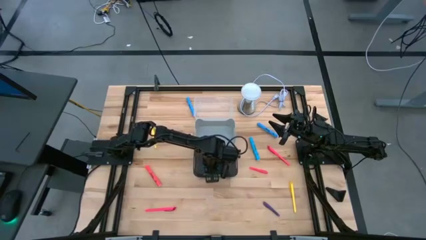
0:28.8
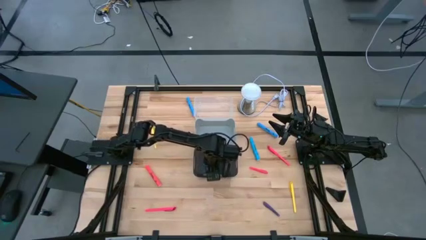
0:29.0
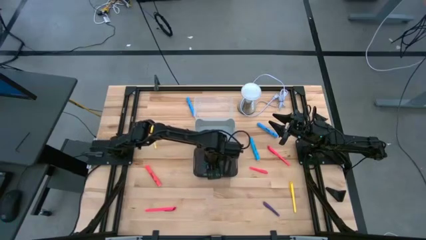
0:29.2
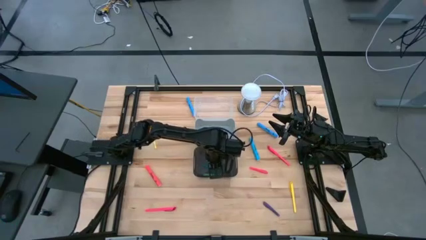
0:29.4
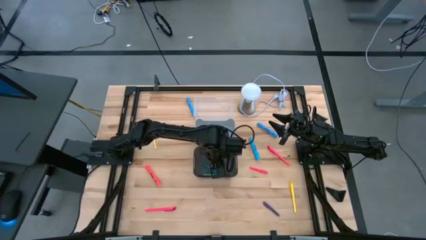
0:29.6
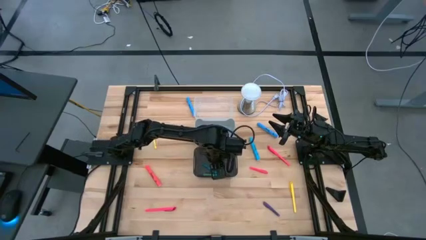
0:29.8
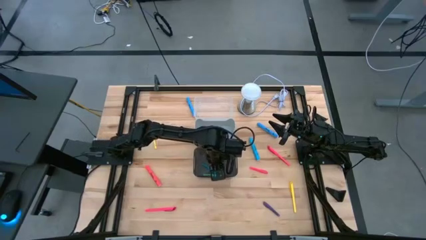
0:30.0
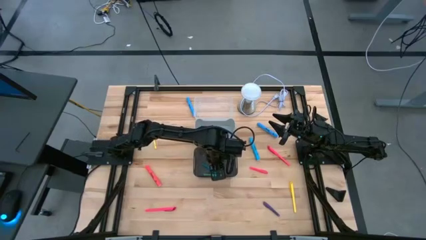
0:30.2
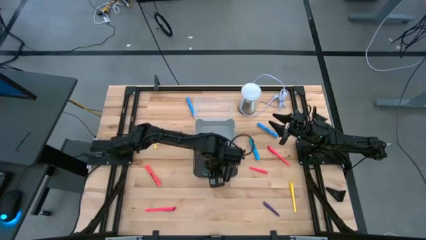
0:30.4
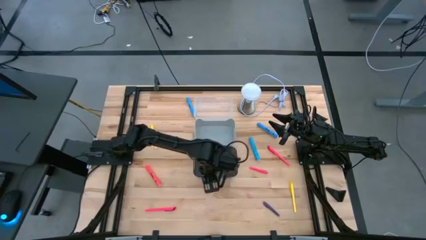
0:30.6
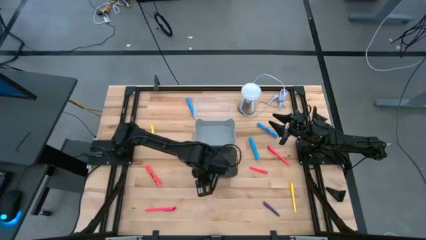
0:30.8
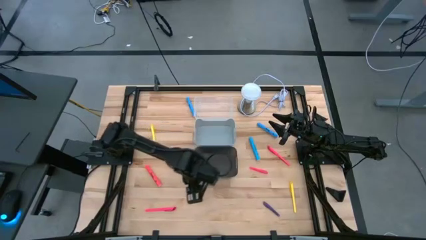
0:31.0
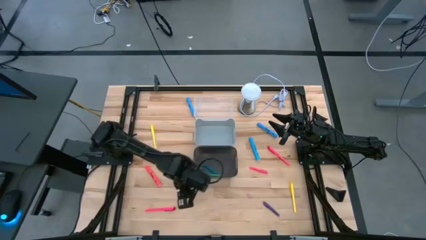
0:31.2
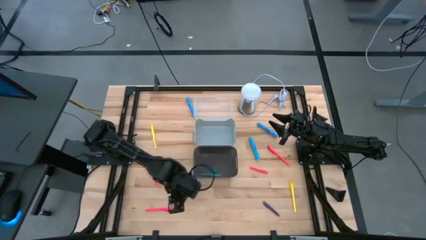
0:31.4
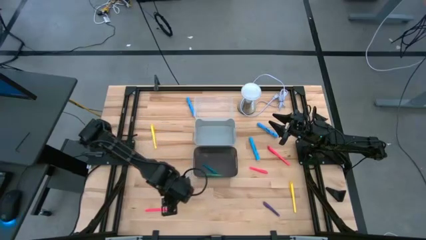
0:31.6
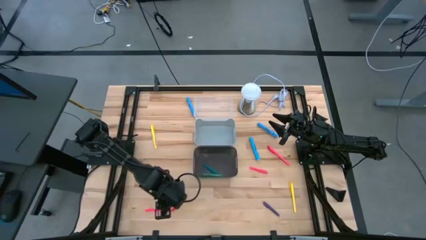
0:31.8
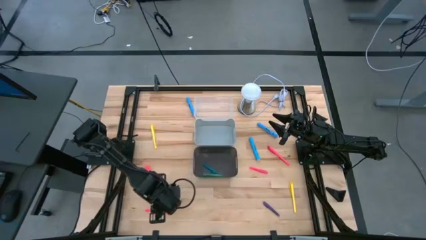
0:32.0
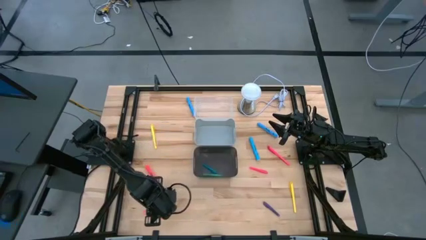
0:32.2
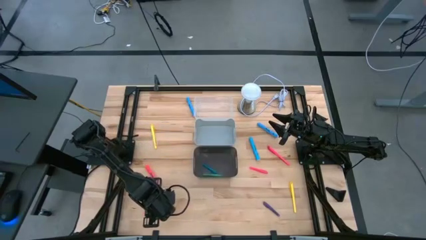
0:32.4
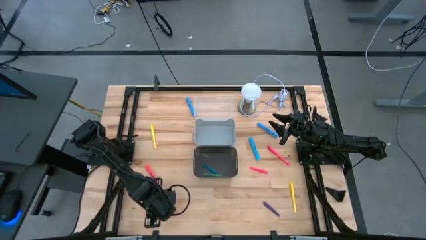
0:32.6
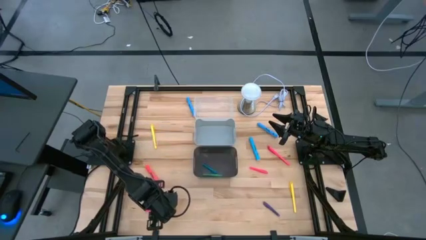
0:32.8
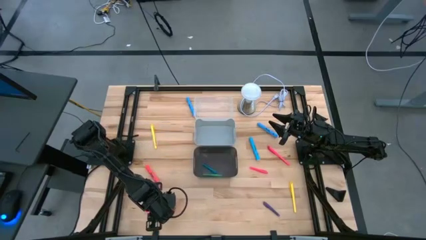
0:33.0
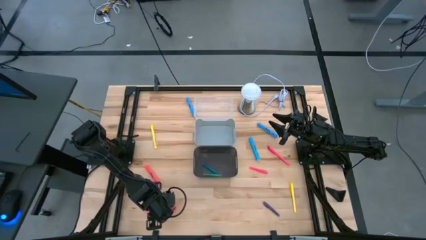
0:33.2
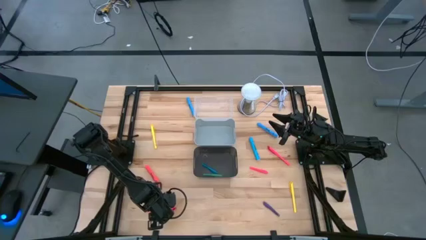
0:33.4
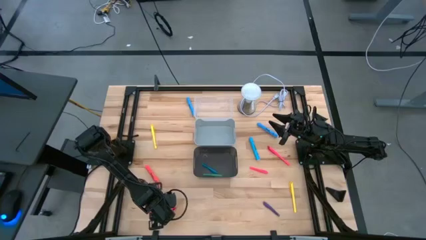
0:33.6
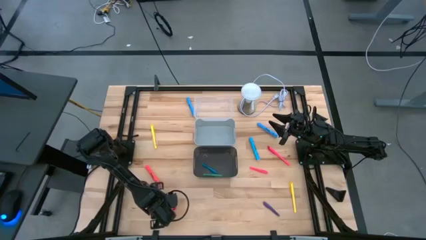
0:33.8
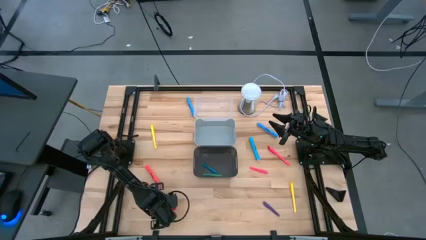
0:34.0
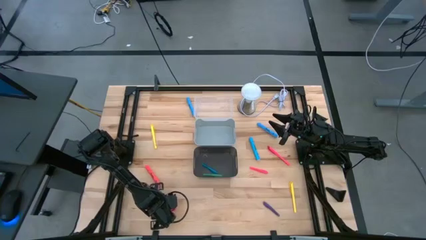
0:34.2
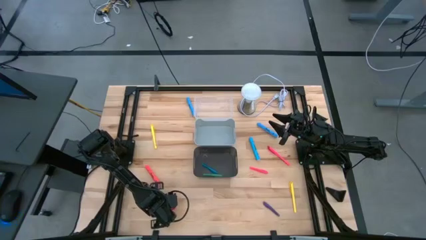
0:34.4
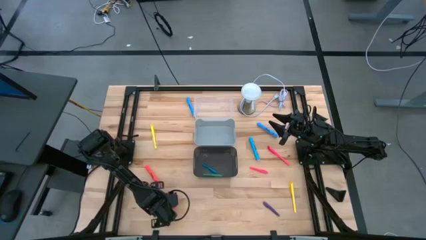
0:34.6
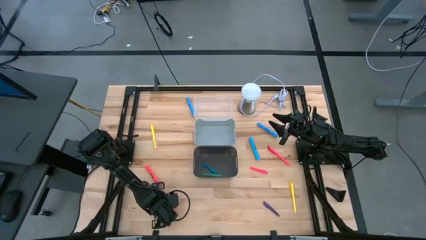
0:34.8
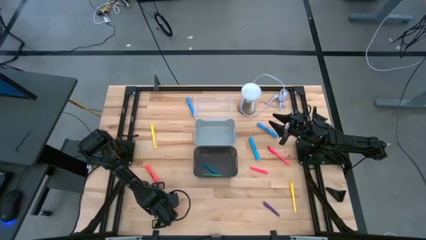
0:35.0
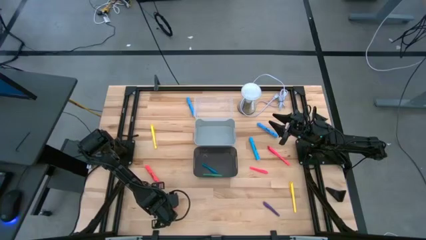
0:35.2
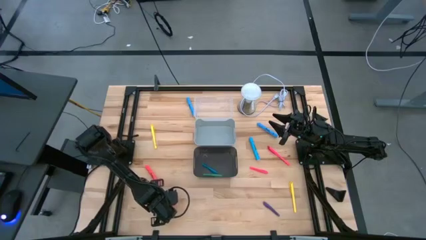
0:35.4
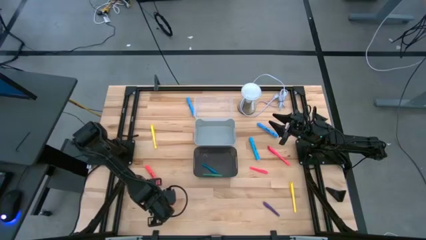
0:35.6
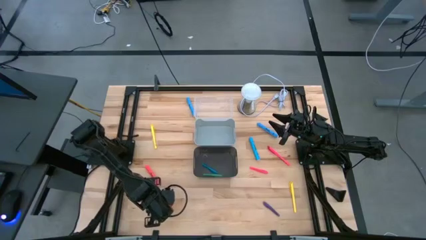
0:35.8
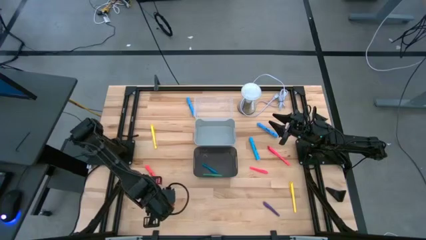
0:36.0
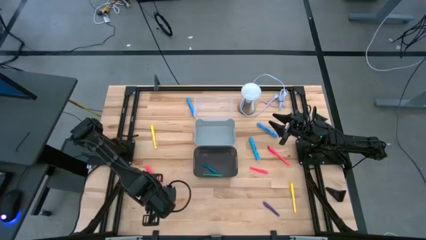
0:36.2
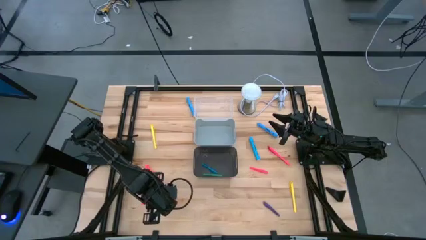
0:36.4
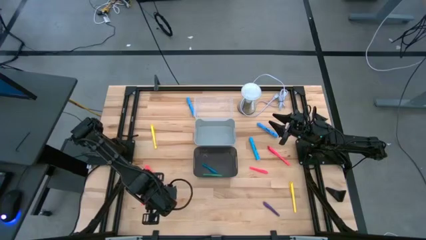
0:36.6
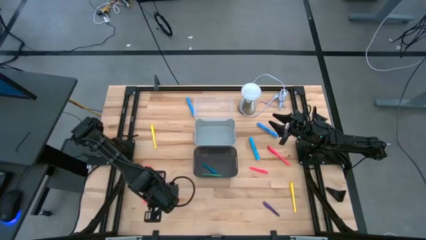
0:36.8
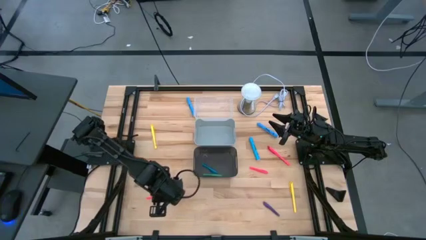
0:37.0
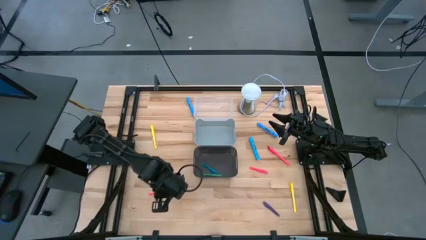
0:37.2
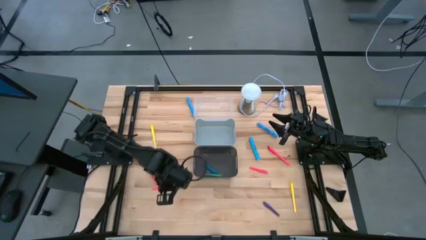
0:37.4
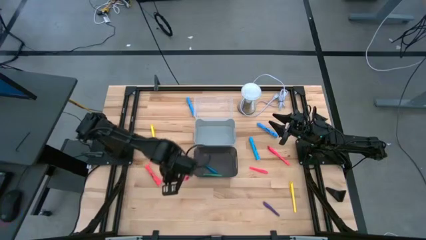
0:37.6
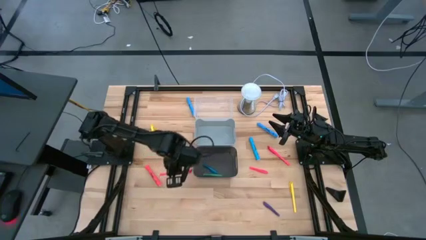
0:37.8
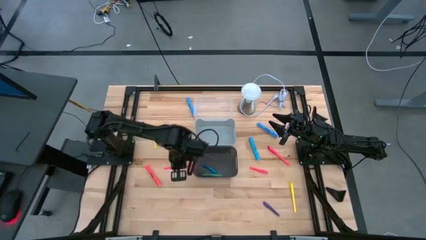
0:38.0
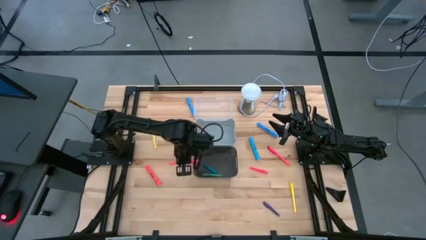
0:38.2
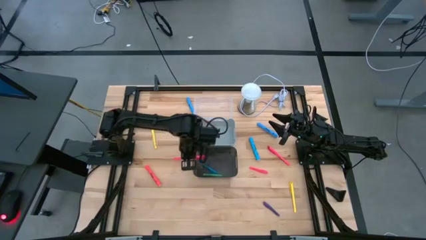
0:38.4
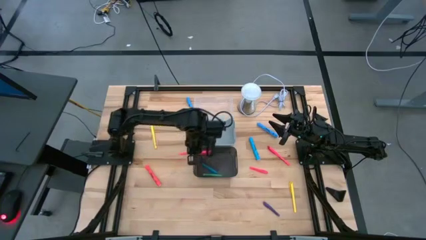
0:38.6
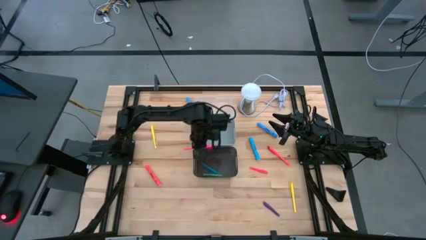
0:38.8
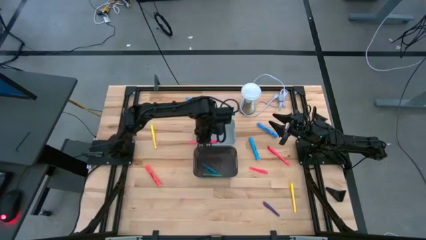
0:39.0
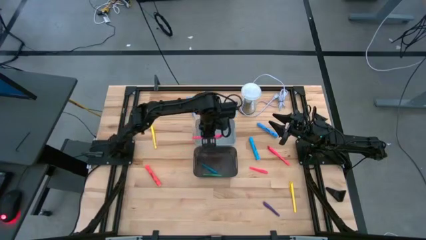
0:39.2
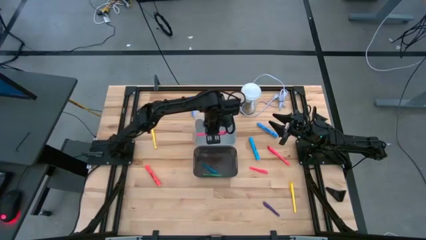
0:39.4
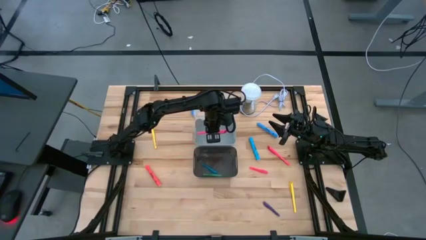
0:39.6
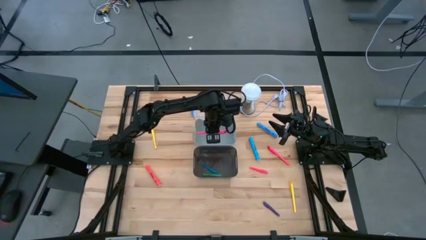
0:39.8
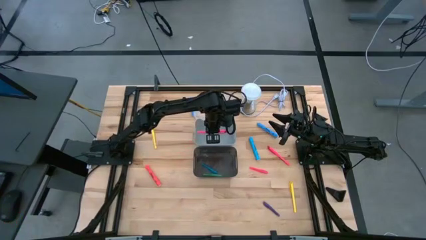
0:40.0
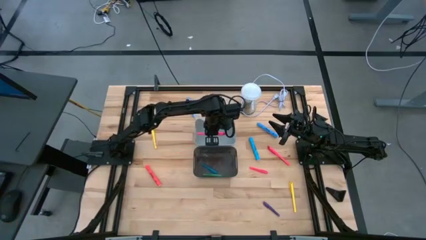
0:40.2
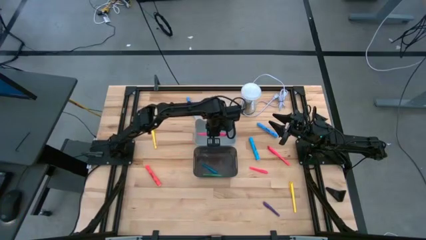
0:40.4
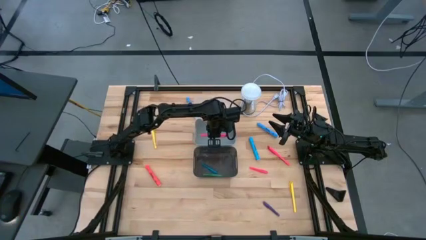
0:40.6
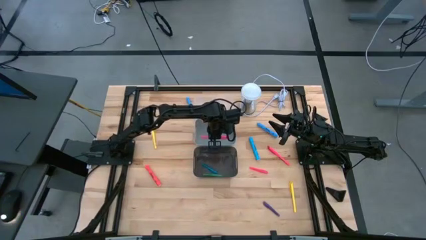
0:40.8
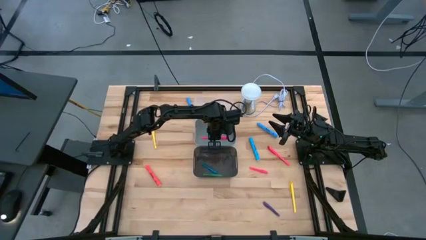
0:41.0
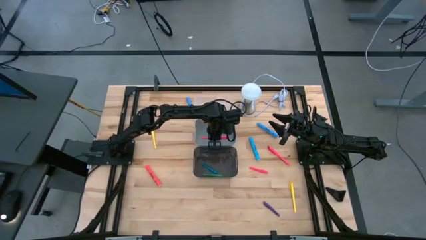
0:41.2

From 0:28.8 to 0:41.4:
Task: Pick & Place Markers
Put the pink marker into the transparent bin

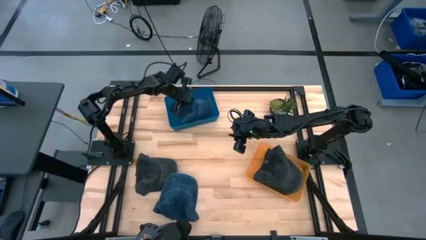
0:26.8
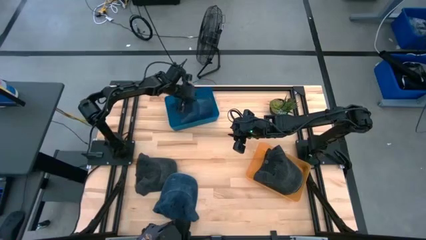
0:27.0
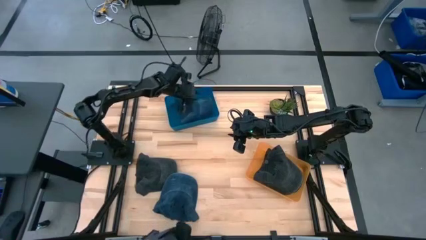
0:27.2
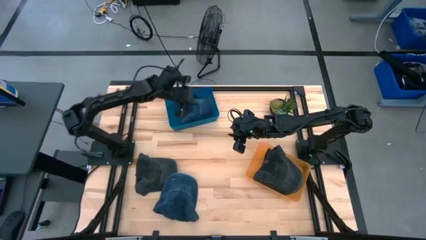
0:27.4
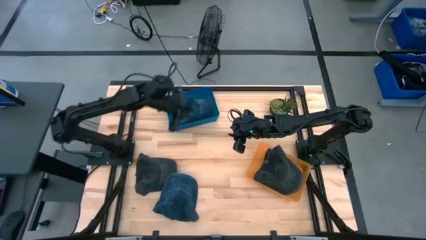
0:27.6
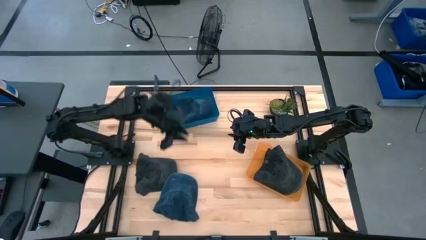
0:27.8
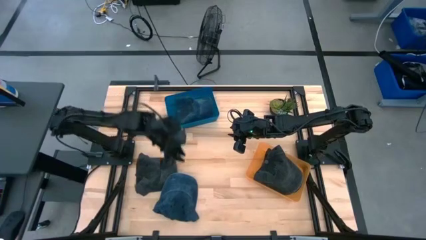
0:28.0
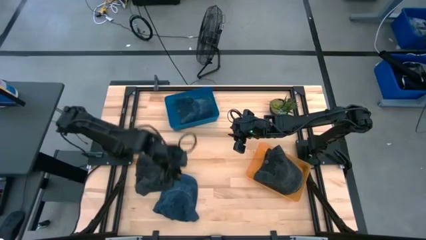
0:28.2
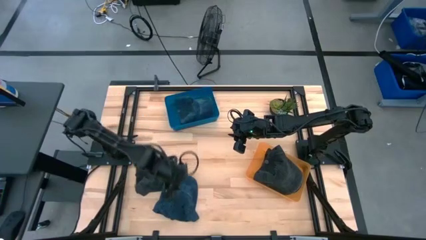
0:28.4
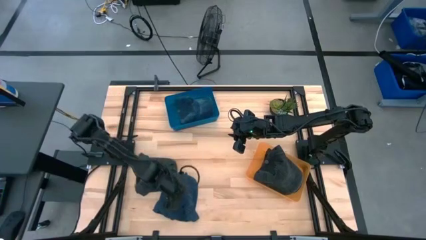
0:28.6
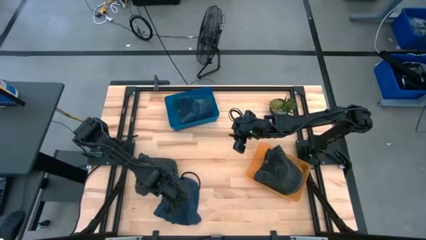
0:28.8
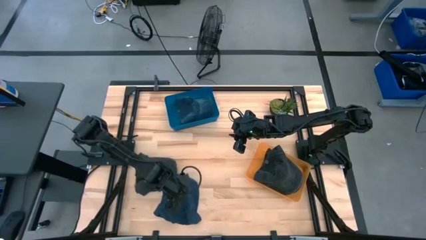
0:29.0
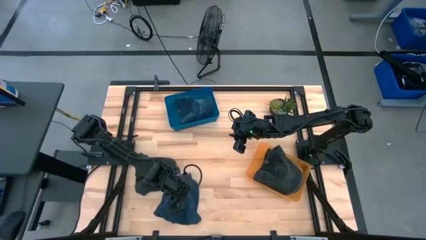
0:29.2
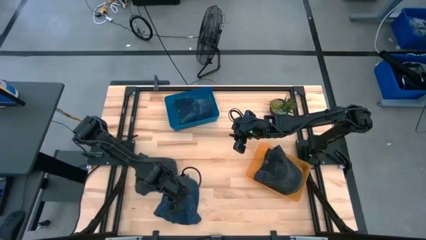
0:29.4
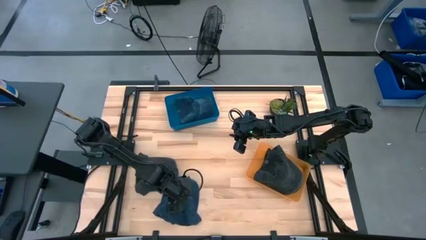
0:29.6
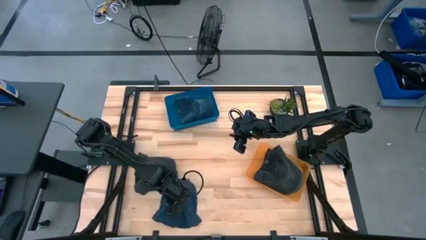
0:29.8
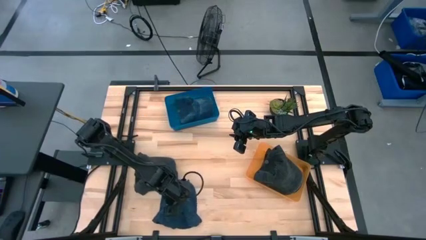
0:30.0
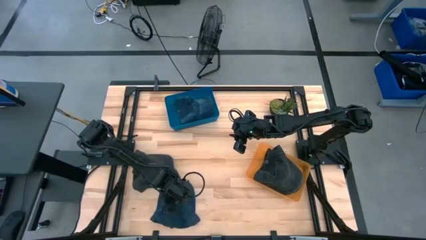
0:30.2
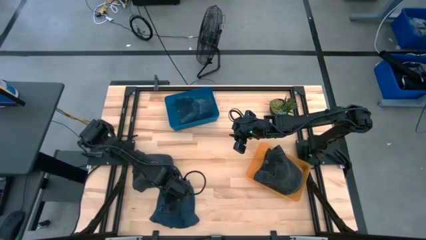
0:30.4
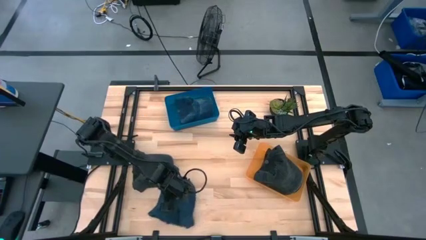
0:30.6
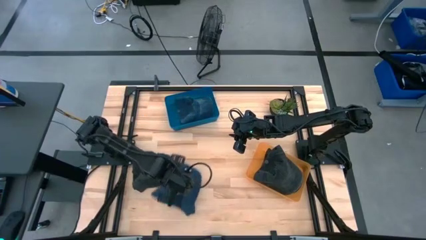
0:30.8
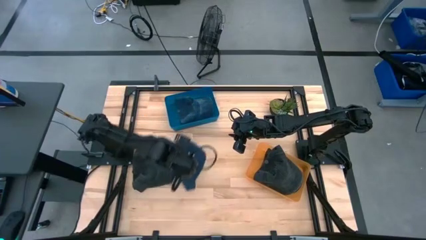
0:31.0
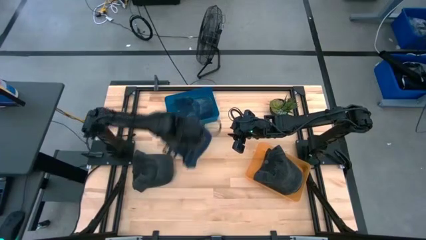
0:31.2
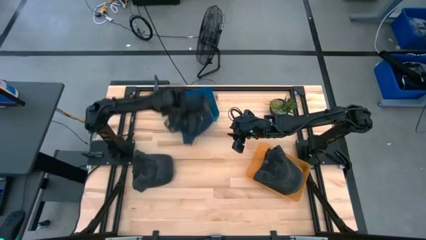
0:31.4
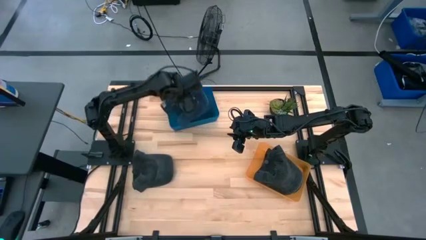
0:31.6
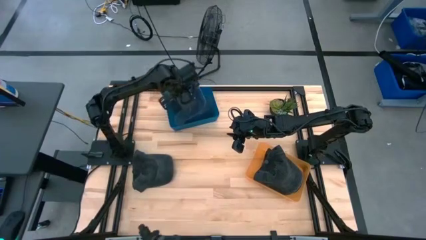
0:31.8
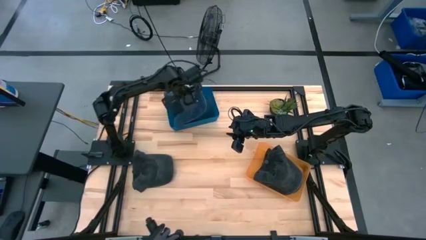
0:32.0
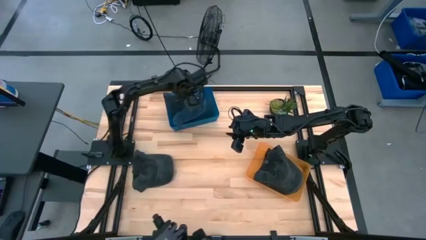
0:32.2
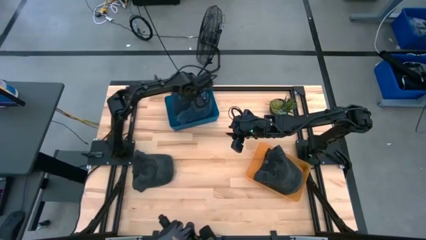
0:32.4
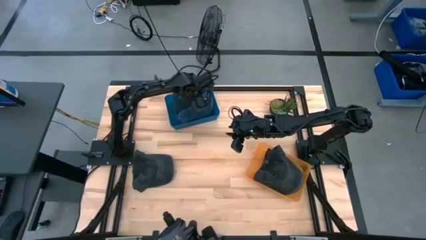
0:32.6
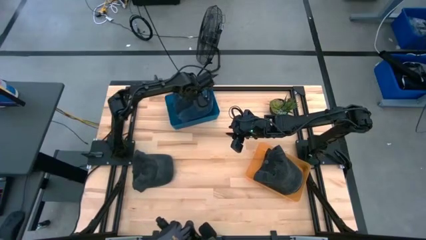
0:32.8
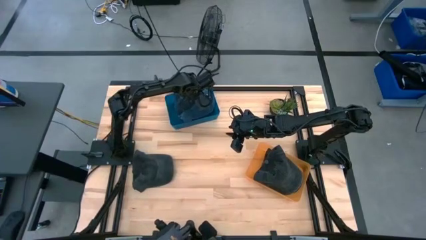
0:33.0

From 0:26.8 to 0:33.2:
Task: Pick & Place hat
Put the blue cap into the blue bin
